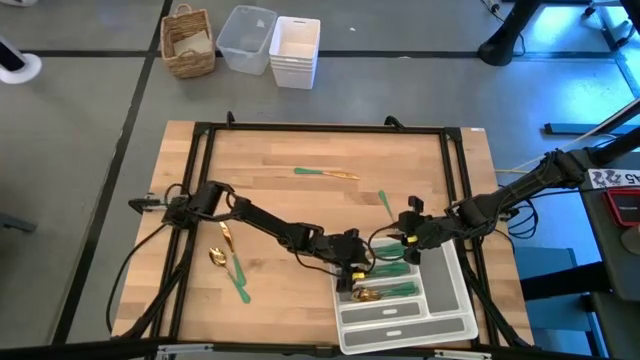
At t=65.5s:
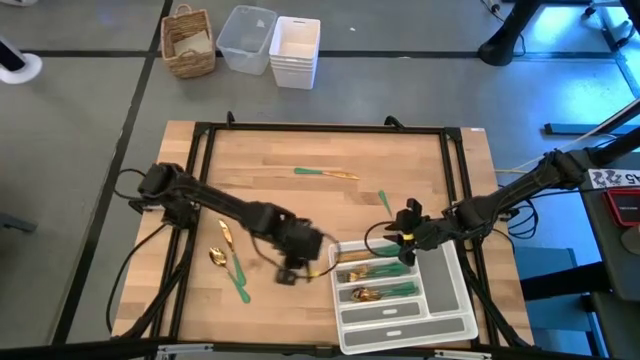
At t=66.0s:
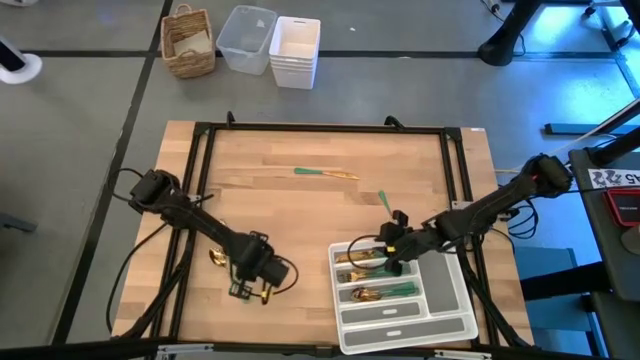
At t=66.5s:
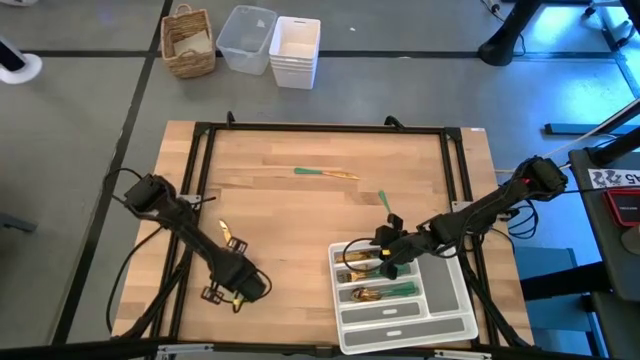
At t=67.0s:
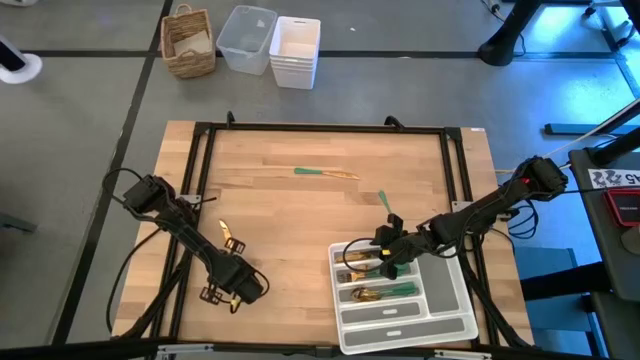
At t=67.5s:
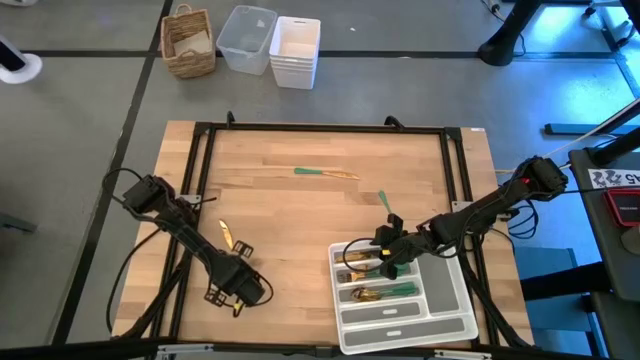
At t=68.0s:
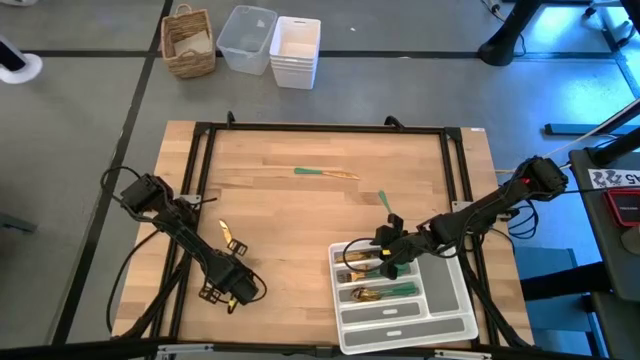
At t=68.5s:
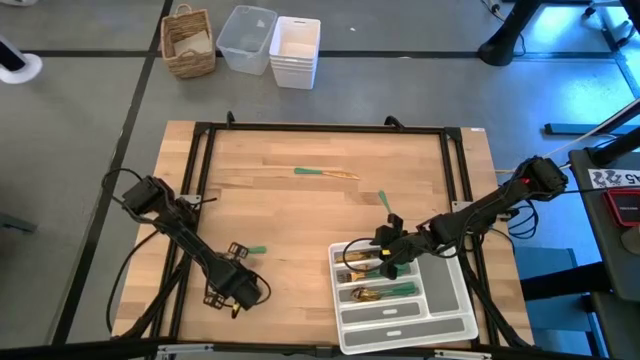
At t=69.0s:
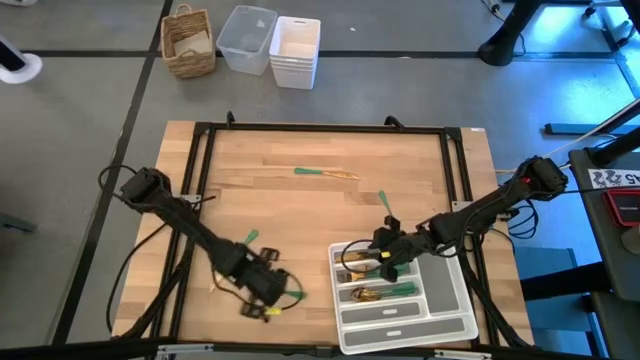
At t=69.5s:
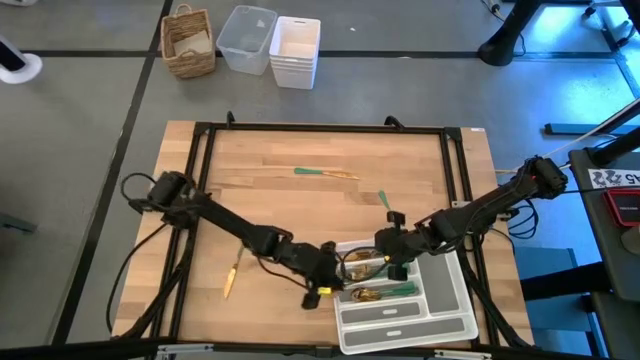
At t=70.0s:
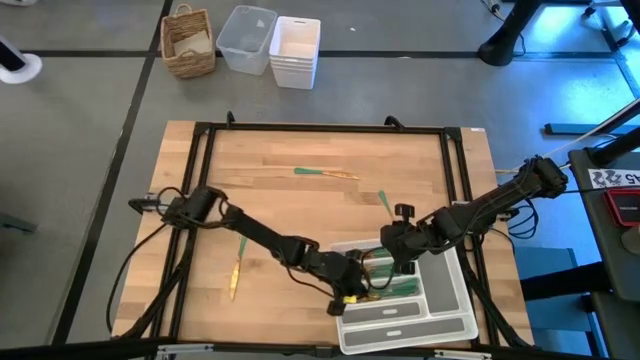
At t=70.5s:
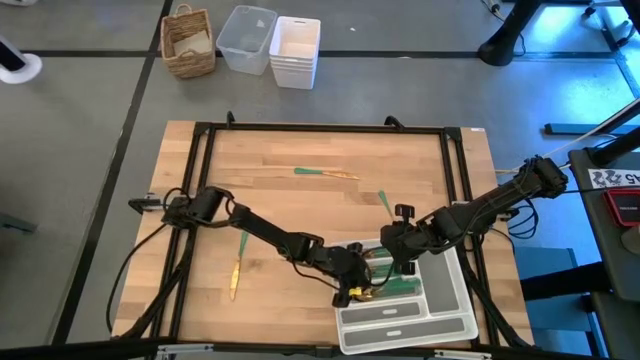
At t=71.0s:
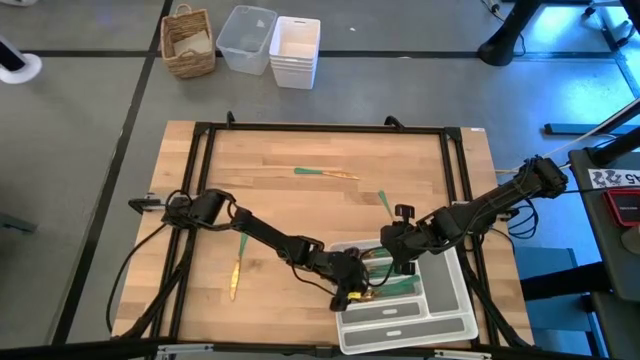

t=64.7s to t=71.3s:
Task: Sort silverware
Put the green spoon into the silverware tray

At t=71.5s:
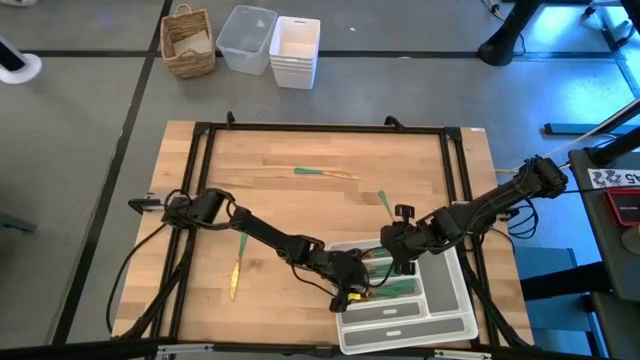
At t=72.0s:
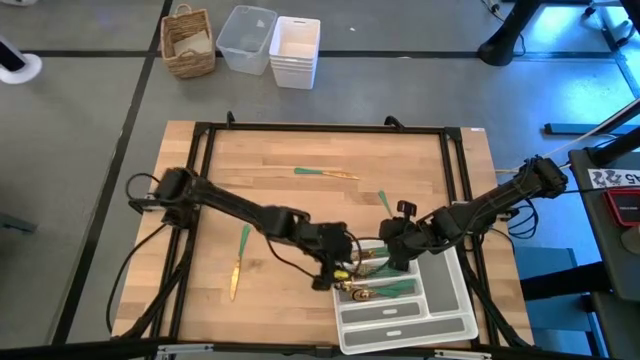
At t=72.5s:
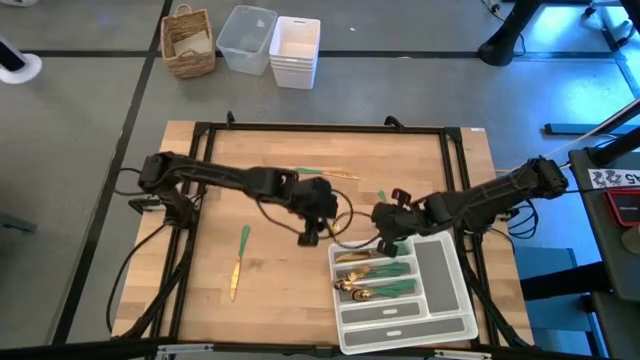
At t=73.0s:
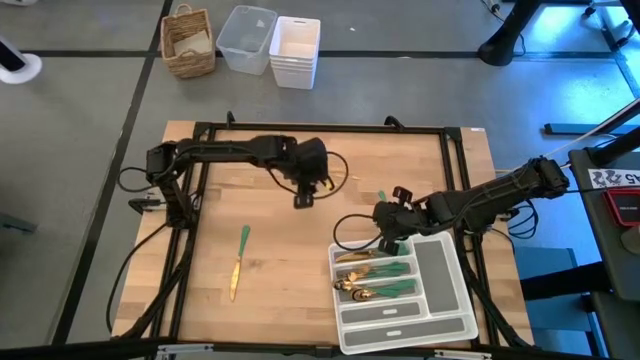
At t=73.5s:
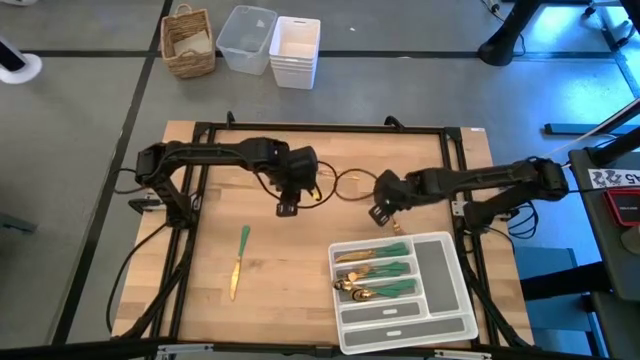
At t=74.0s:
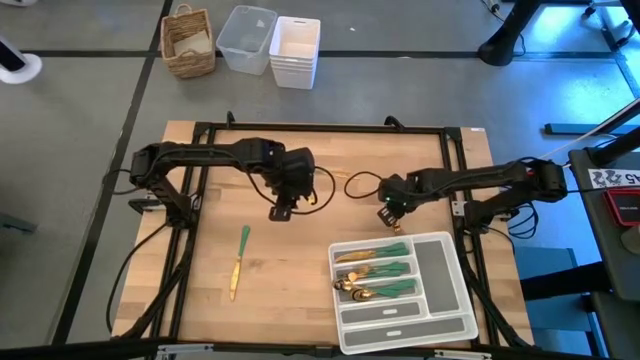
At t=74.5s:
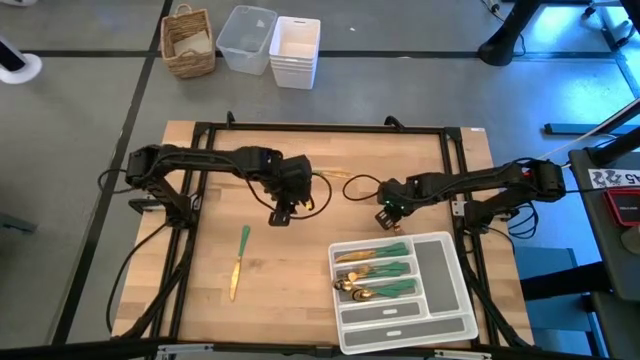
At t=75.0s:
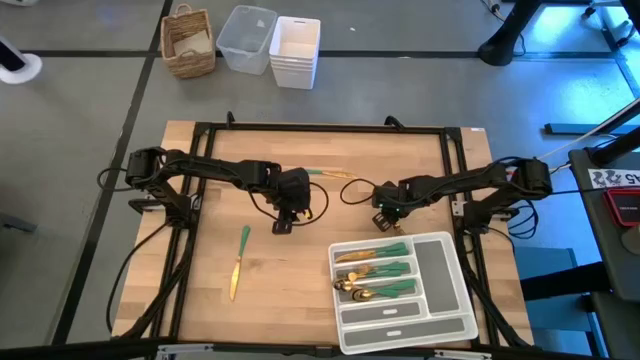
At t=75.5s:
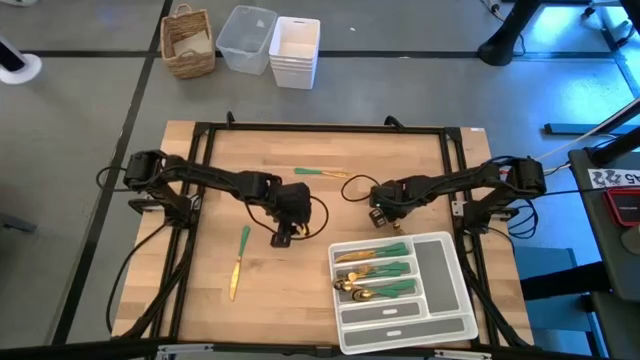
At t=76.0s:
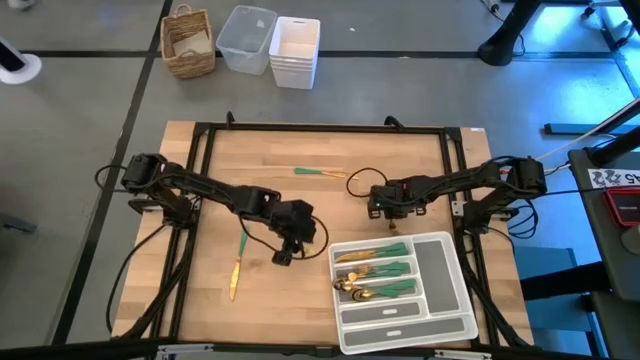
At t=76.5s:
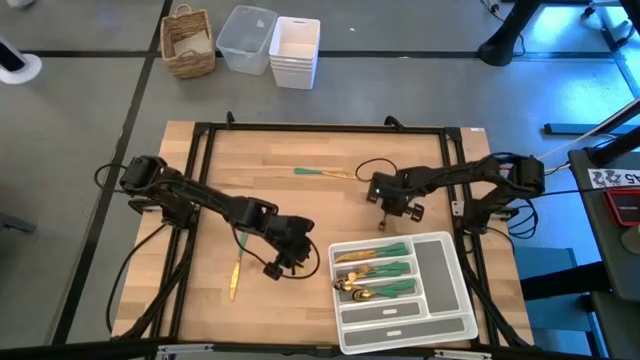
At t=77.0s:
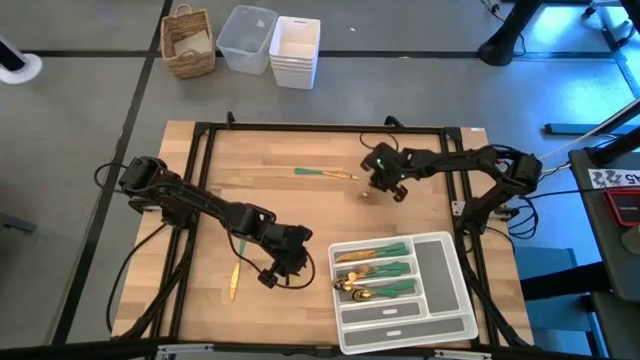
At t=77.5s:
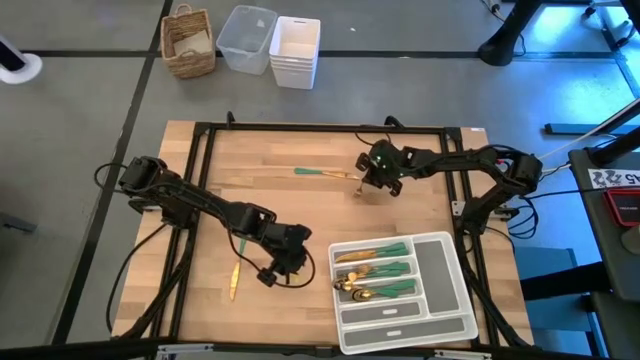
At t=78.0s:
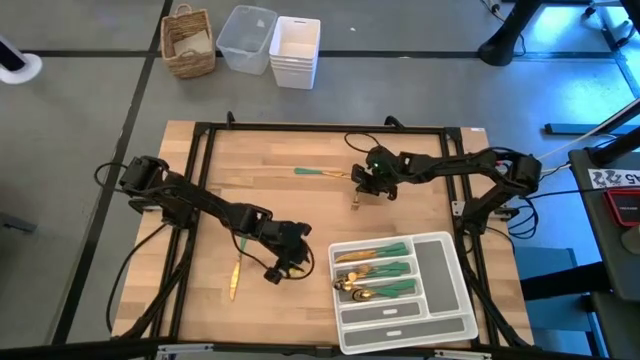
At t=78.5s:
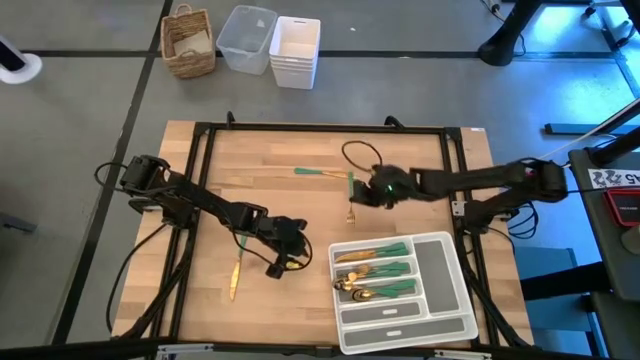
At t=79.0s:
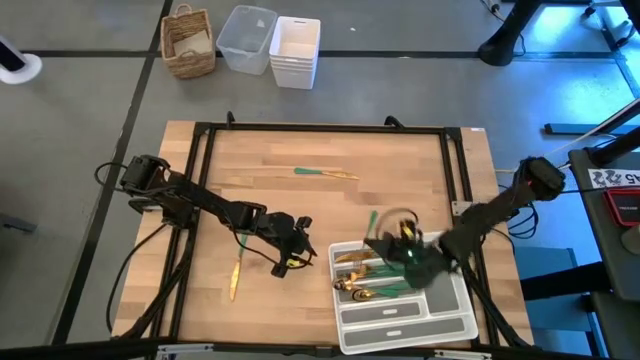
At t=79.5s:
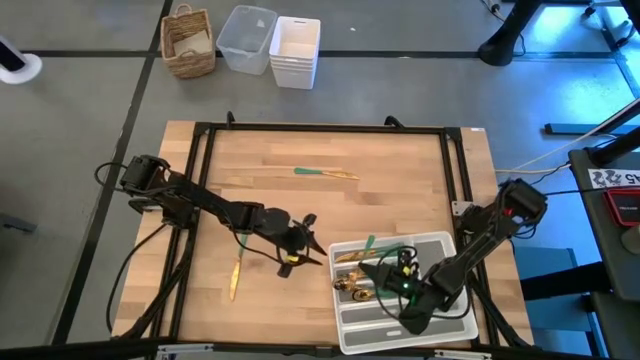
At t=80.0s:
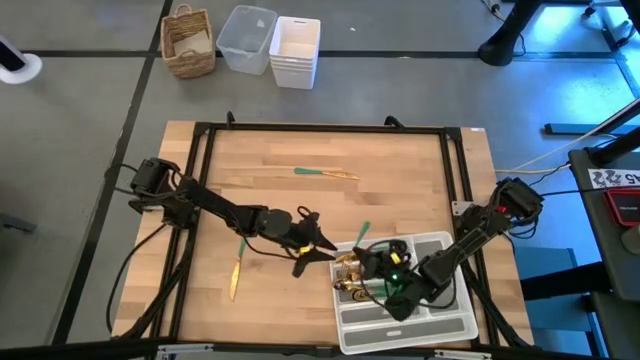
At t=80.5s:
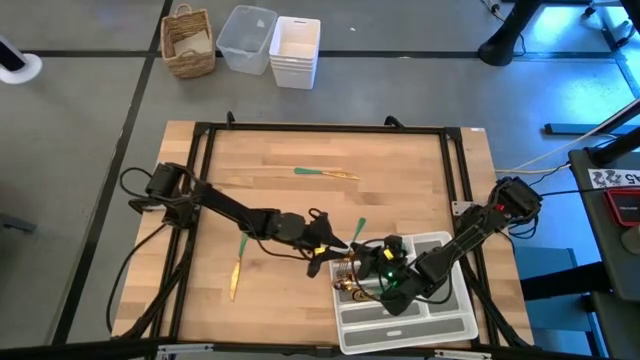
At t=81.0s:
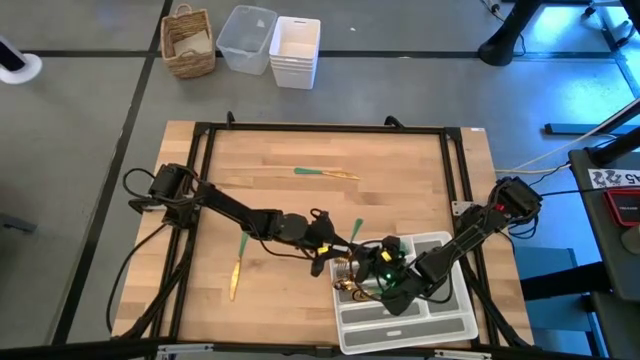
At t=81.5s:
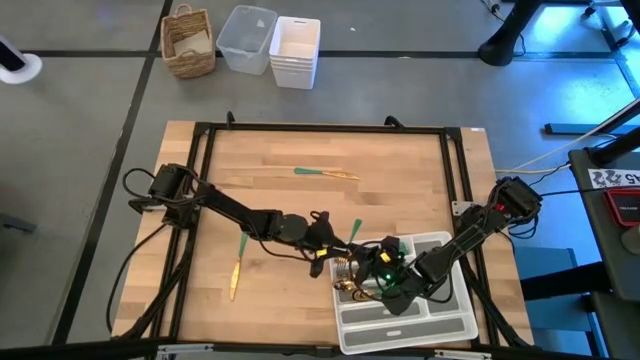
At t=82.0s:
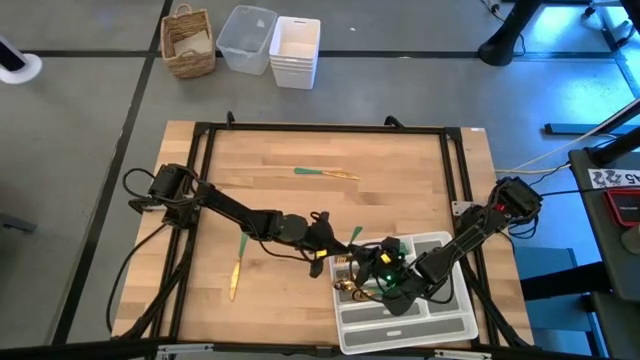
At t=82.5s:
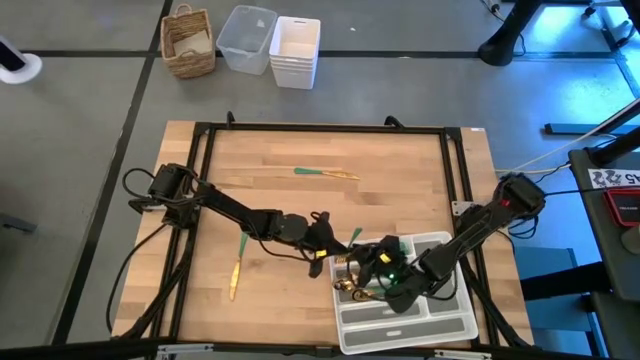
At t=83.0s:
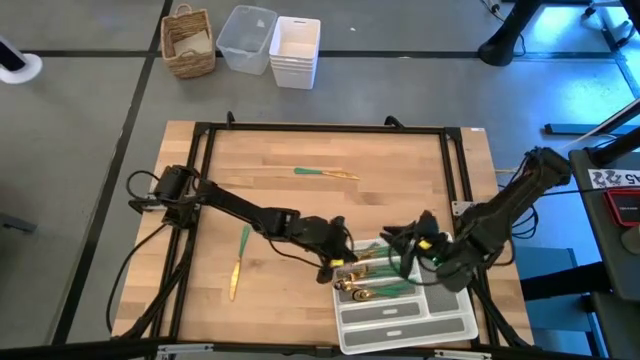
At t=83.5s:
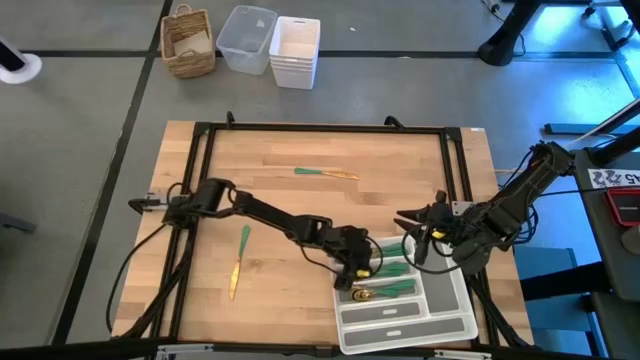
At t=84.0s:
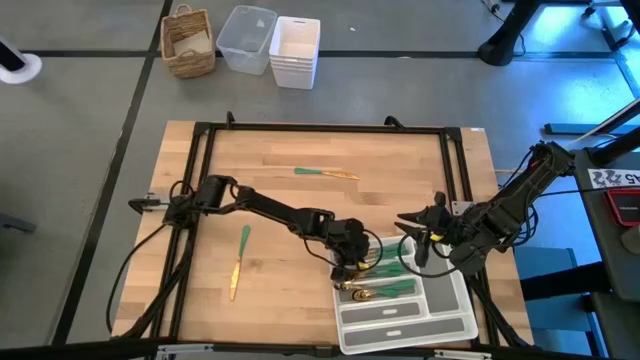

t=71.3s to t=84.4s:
Put the green fork into the silverware tray

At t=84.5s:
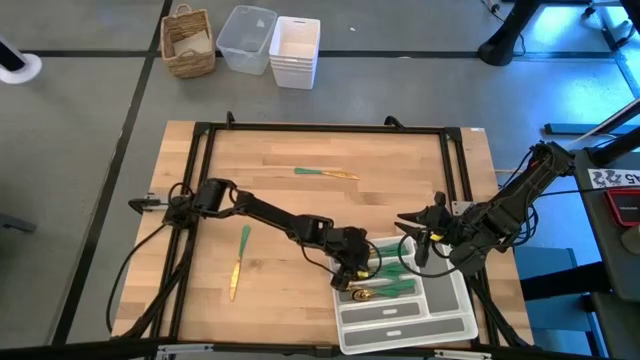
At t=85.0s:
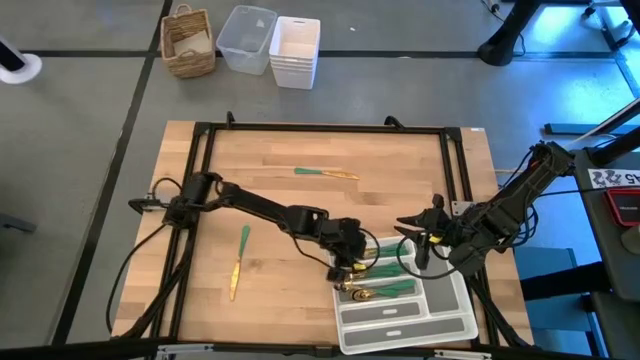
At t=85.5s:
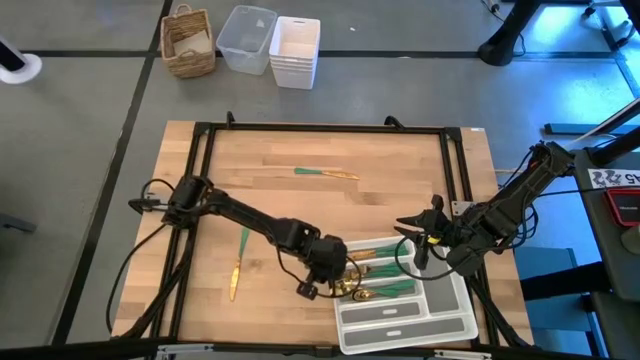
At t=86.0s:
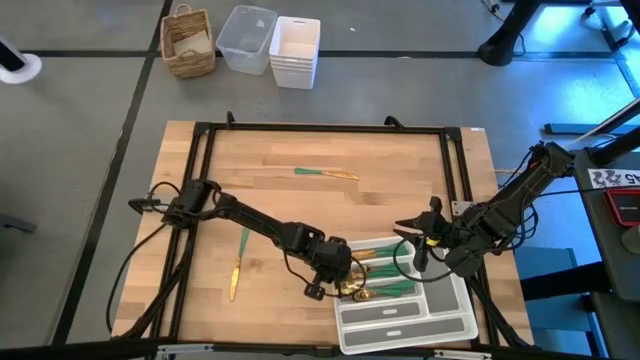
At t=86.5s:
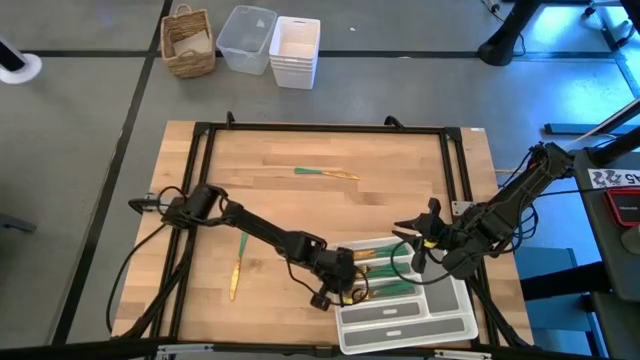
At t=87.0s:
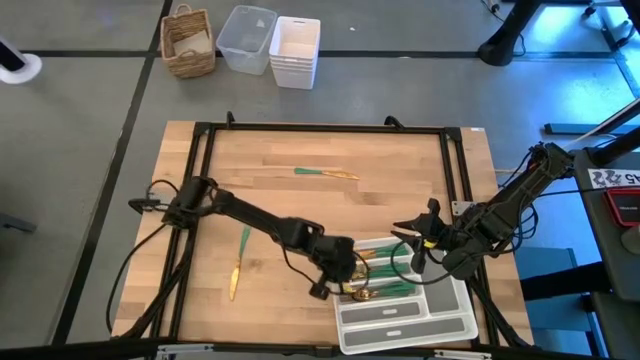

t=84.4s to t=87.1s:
Adjust the green spoon on the silverware tray
